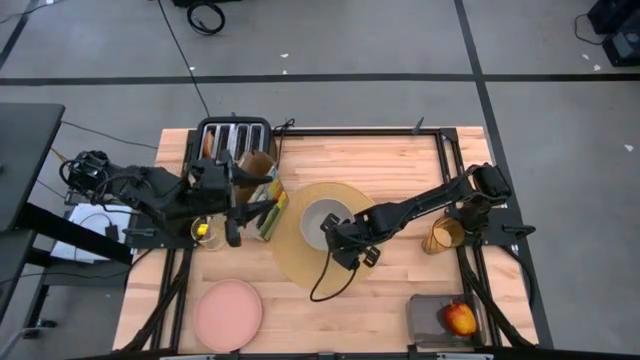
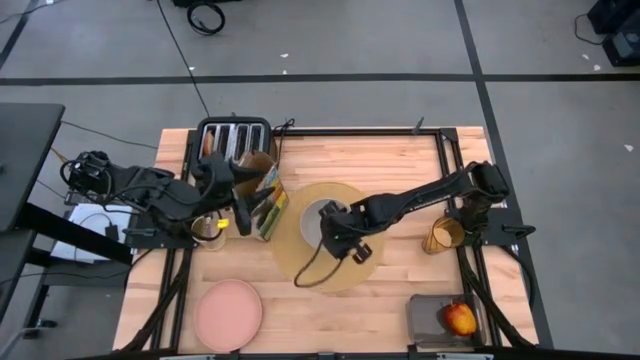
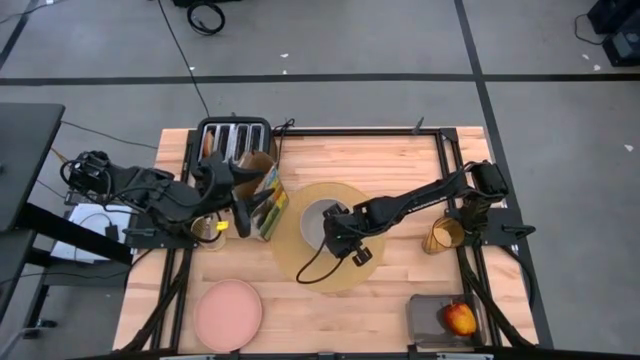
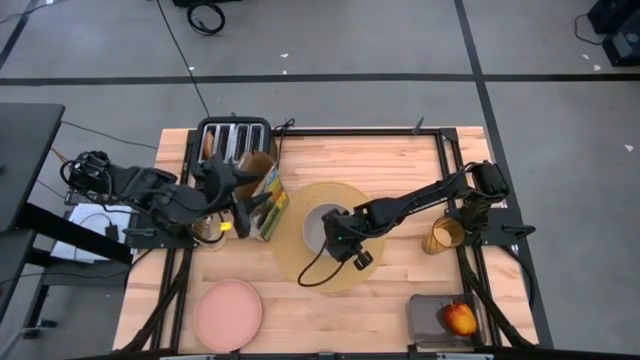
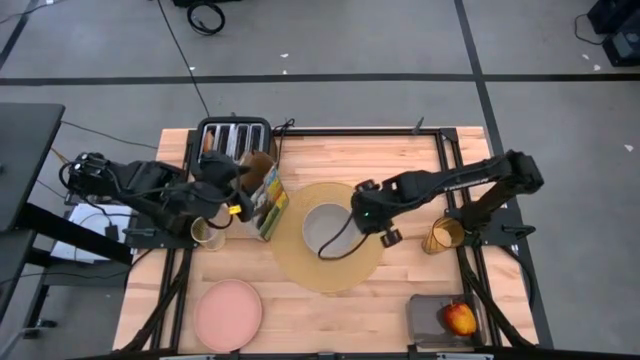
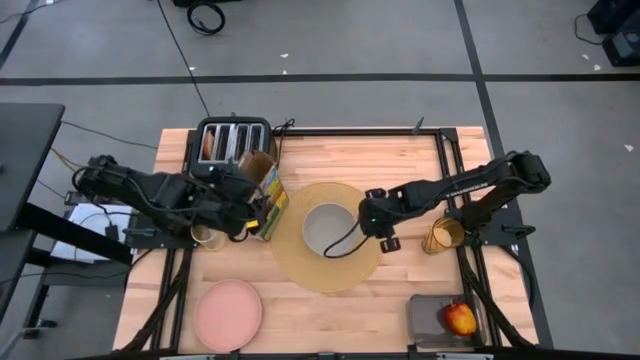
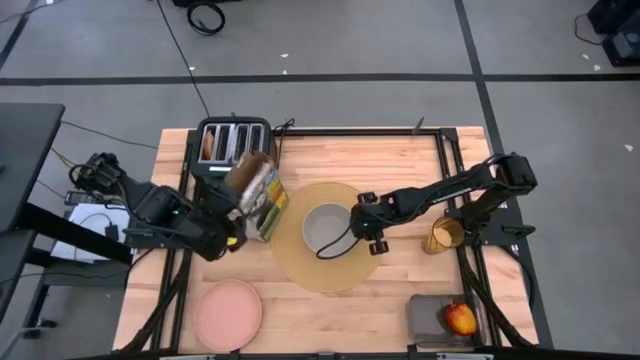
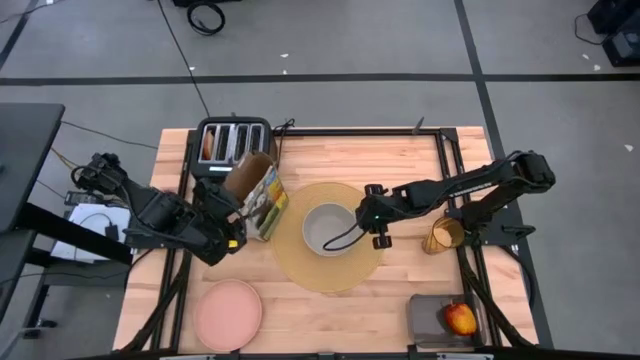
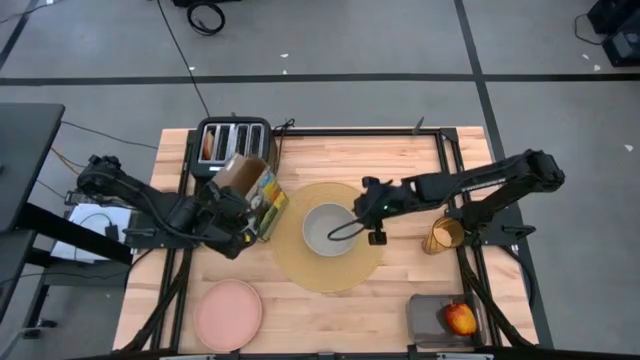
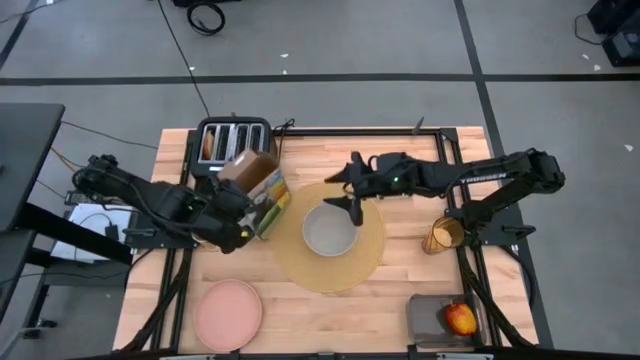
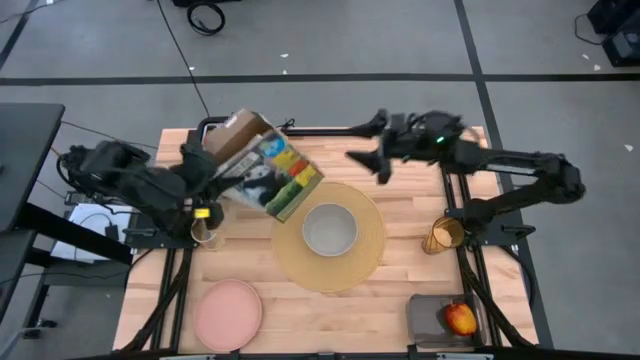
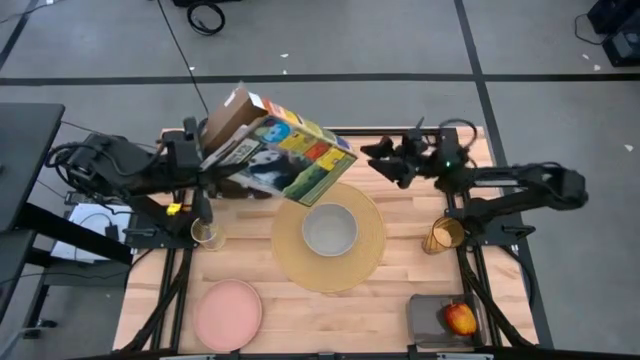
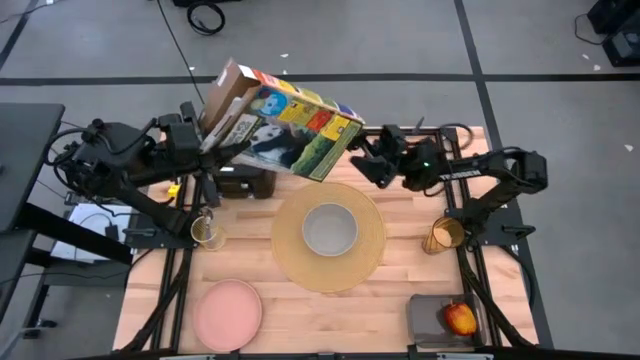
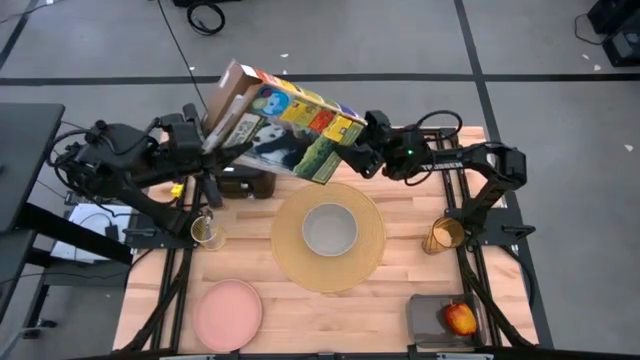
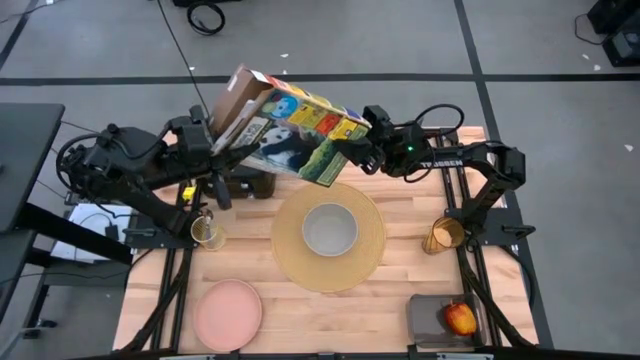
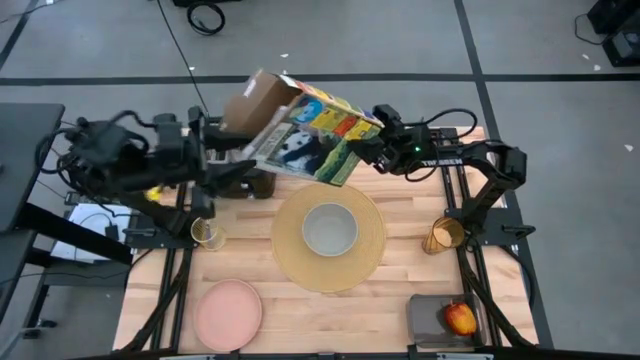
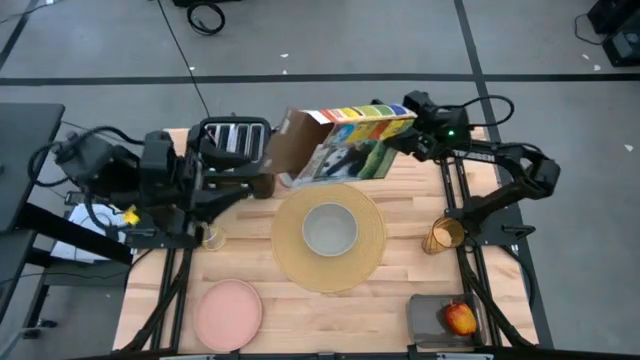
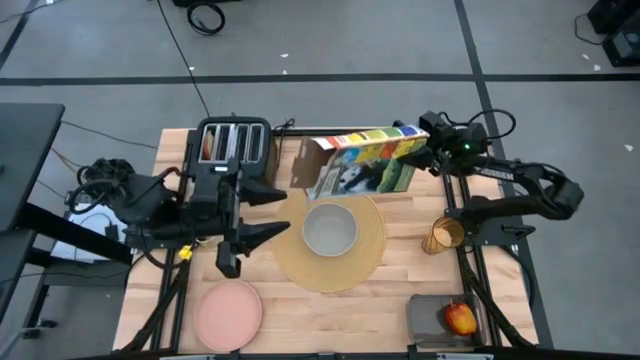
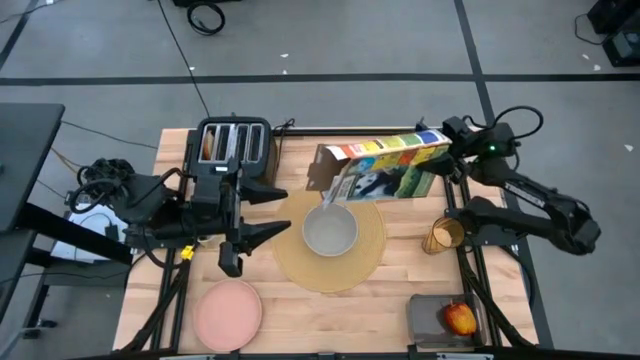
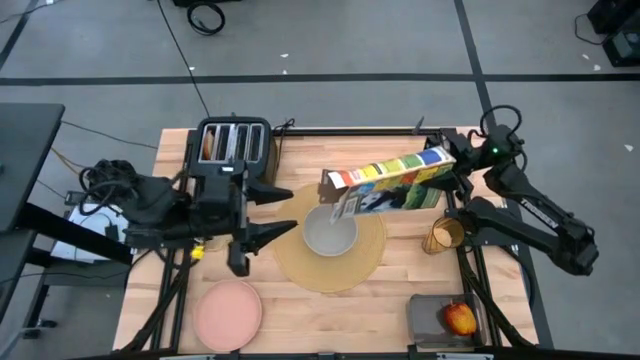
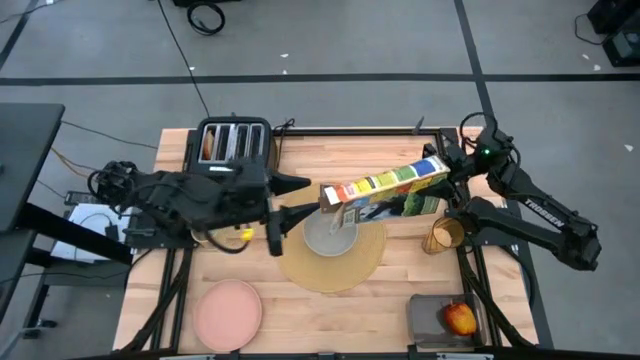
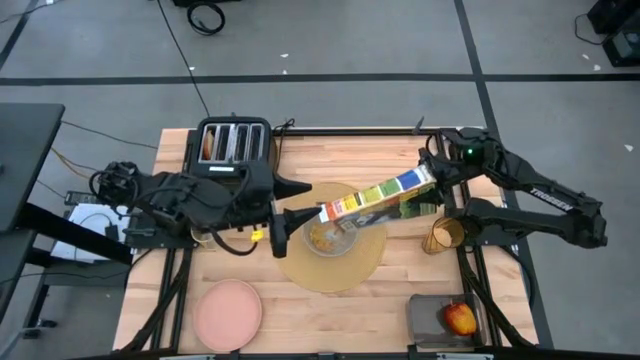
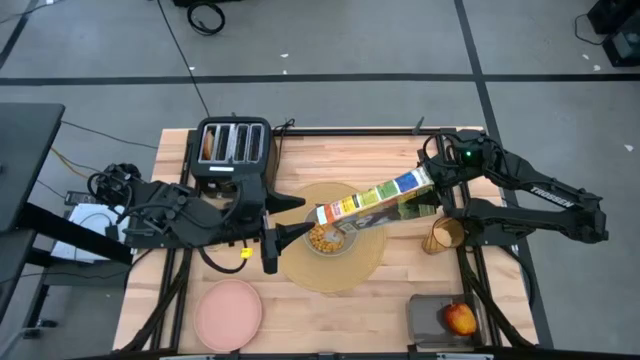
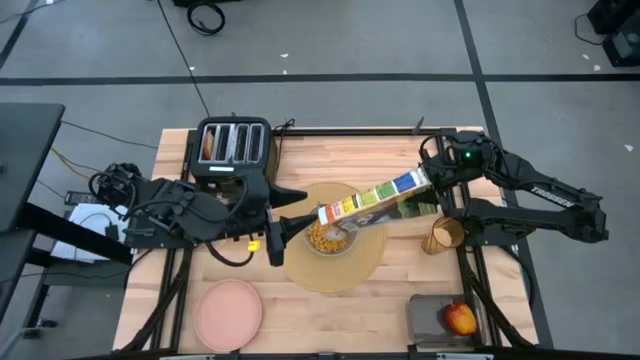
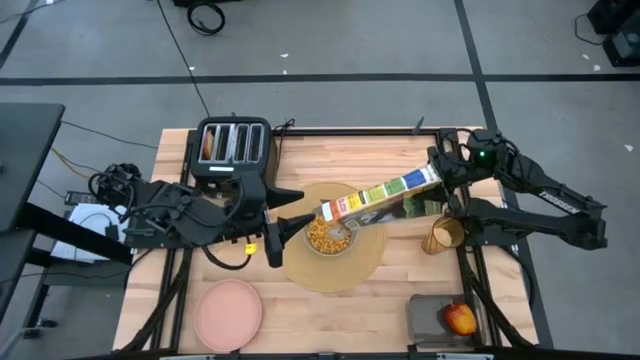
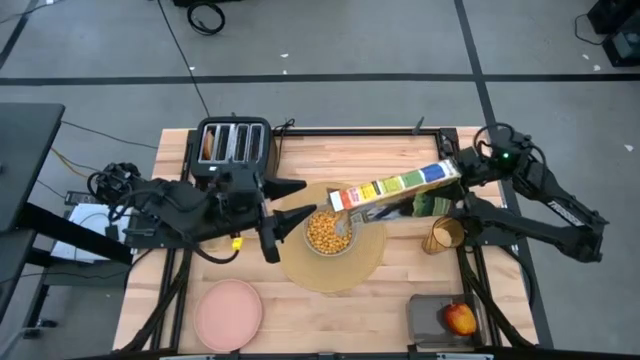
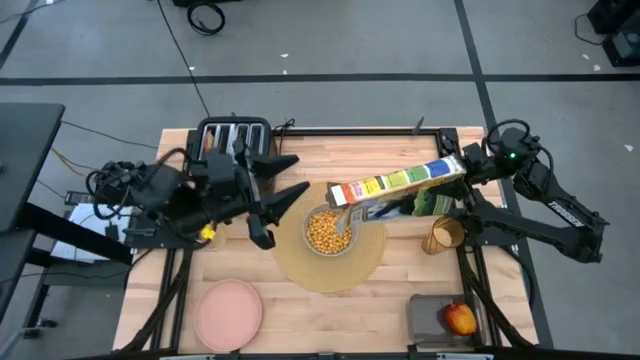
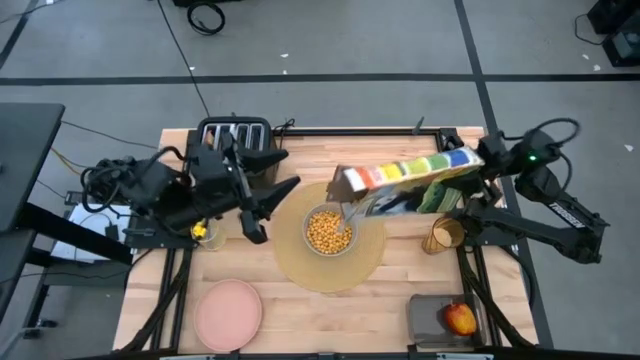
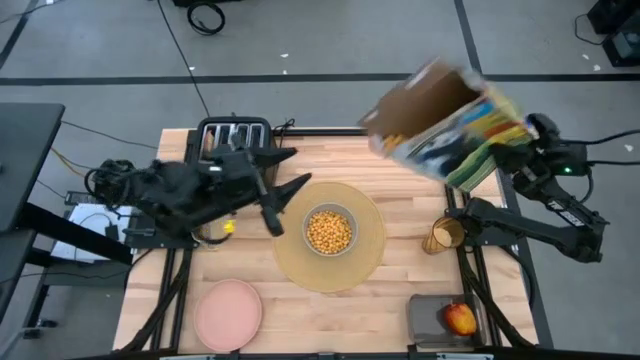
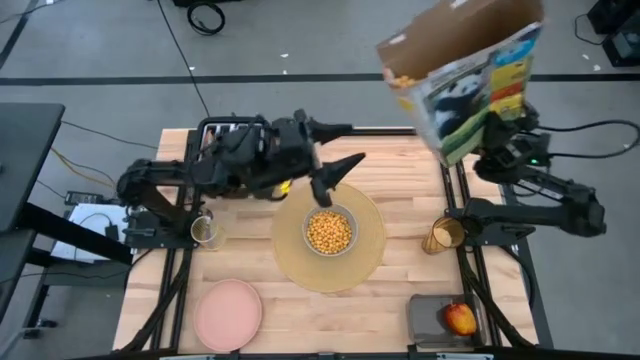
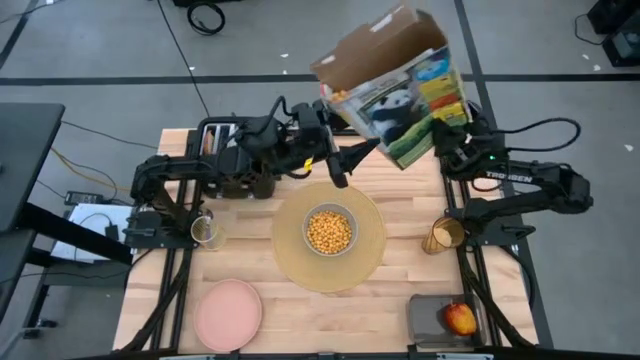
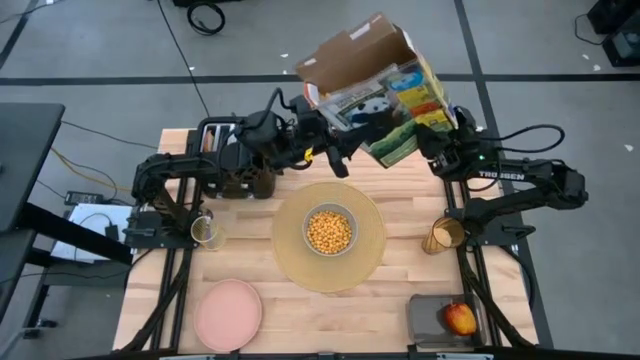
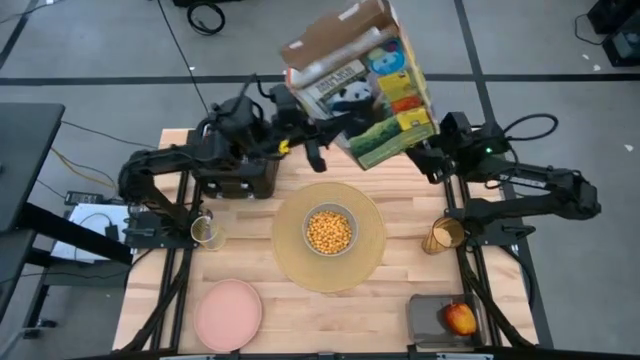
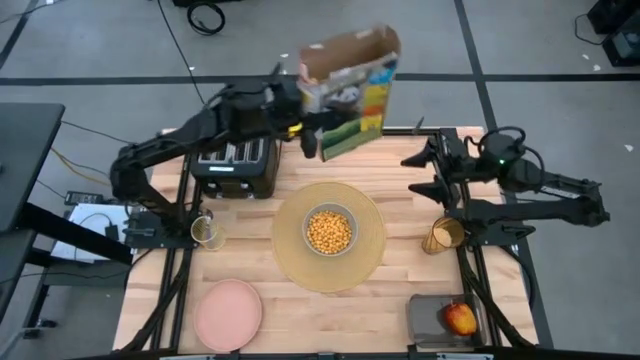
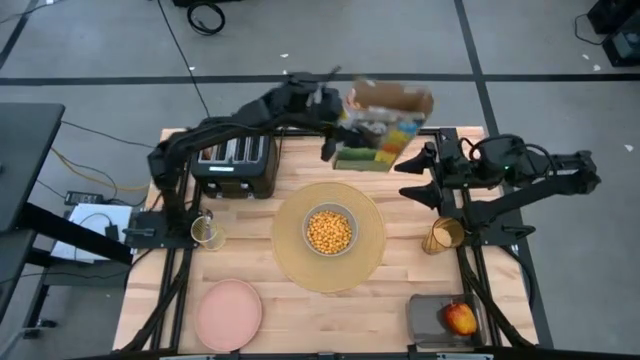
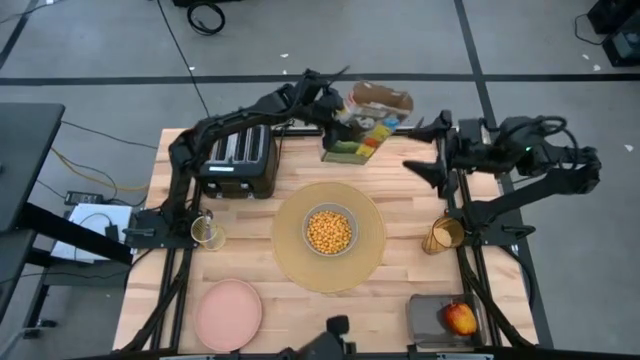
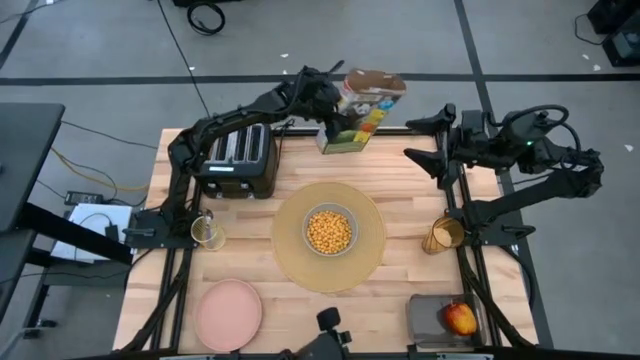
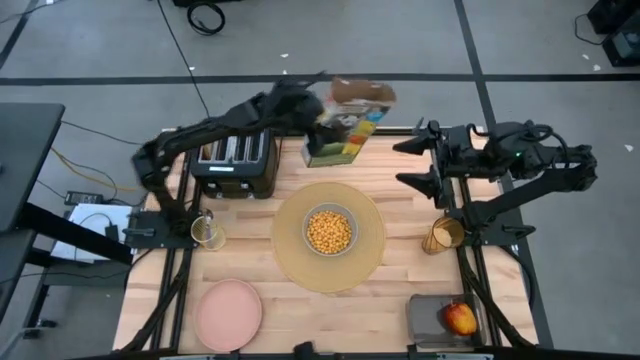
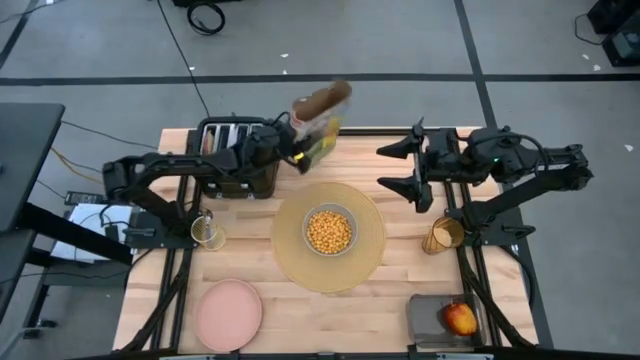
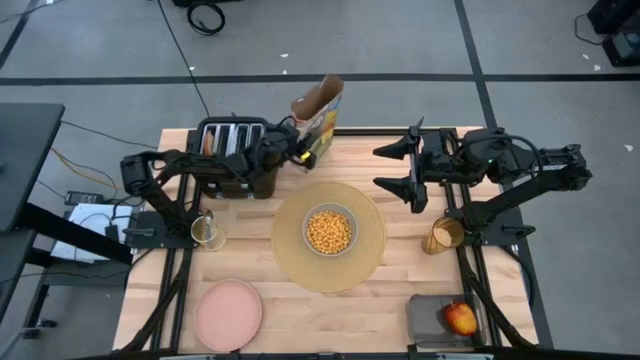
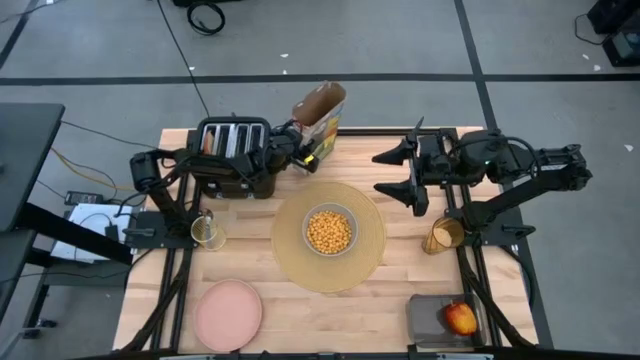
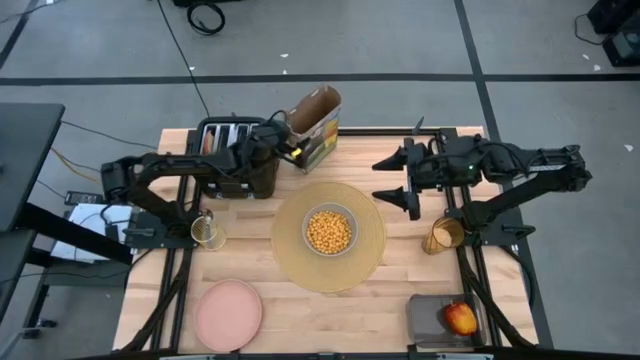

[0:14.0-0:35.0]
Task: Arrange a breakfast setting
Pour the cereal into the gray bowl
